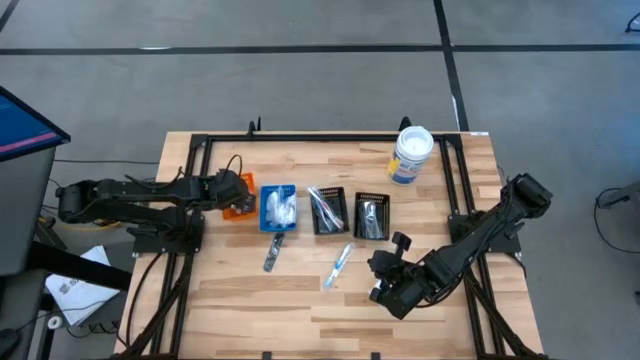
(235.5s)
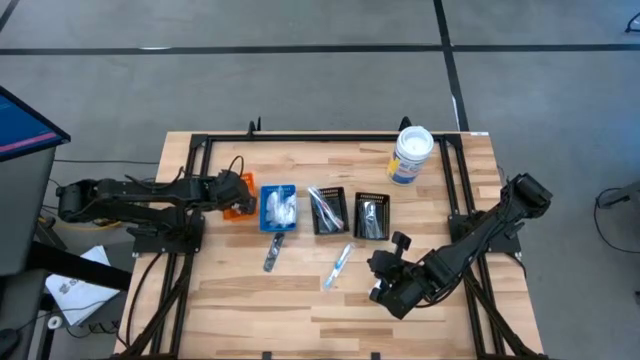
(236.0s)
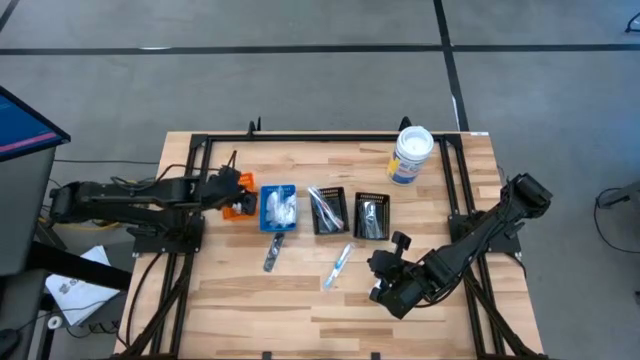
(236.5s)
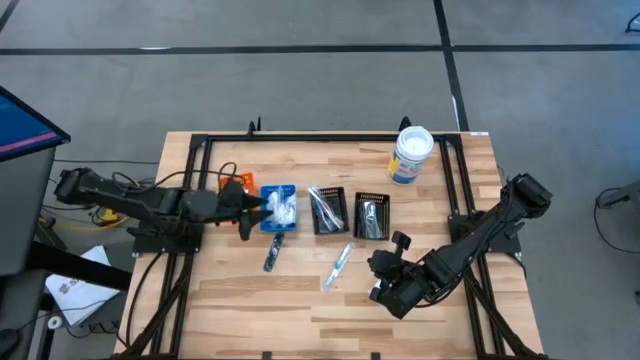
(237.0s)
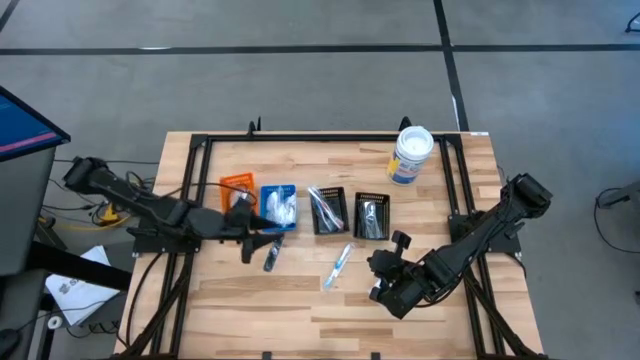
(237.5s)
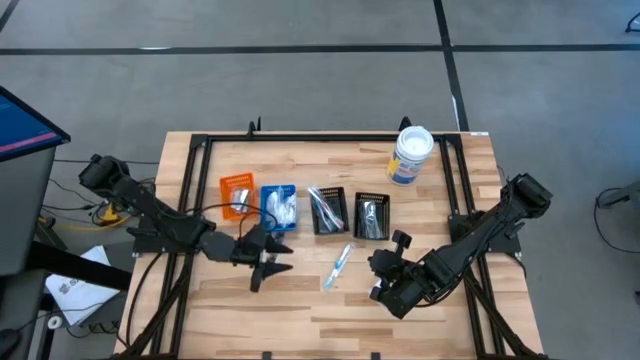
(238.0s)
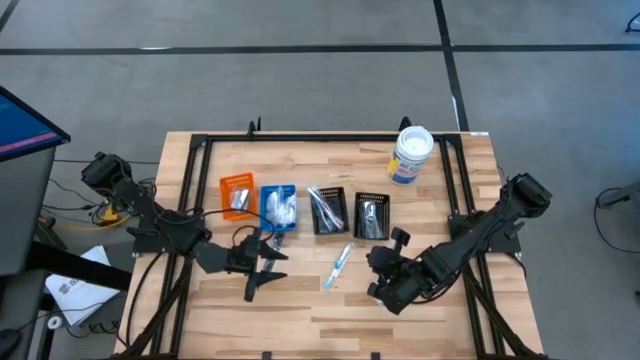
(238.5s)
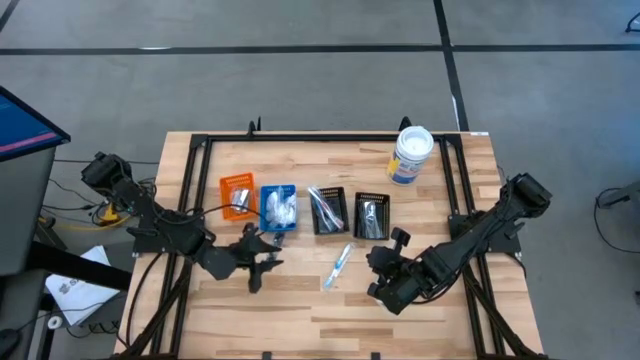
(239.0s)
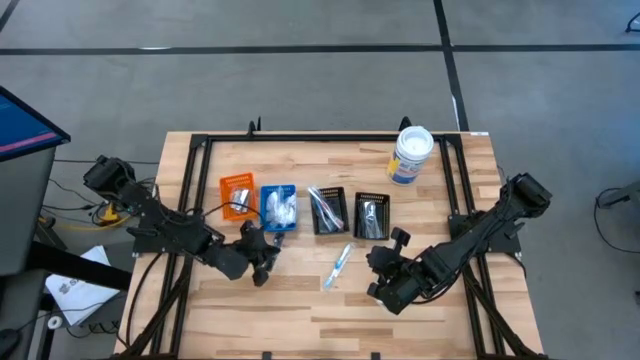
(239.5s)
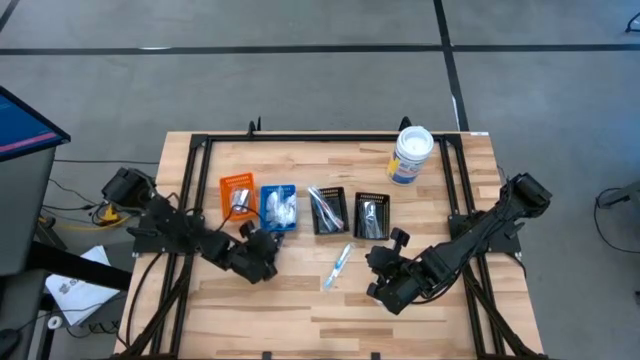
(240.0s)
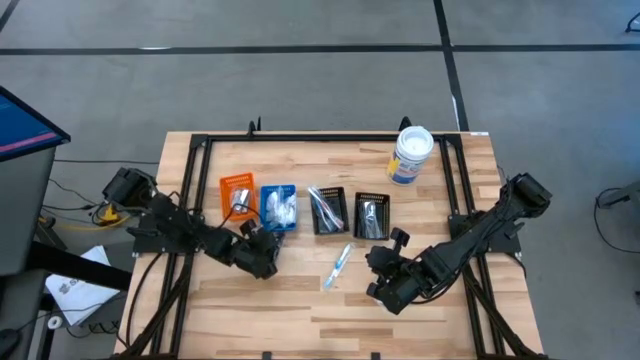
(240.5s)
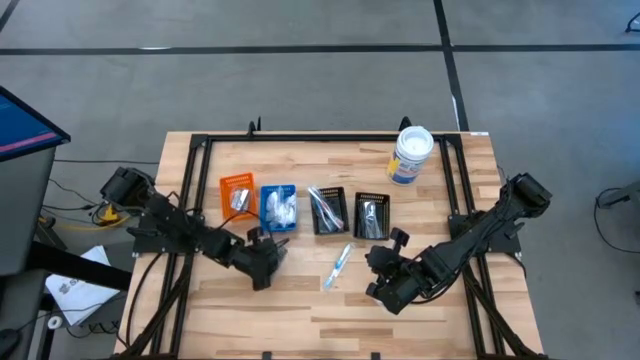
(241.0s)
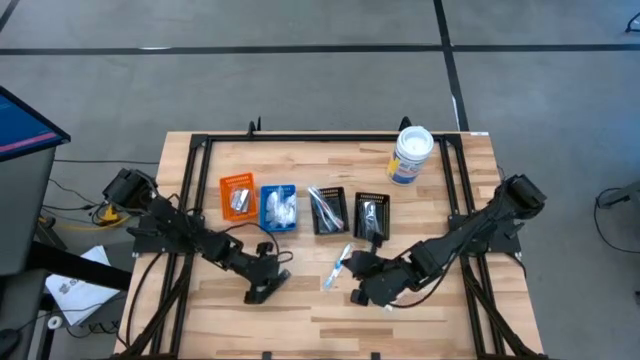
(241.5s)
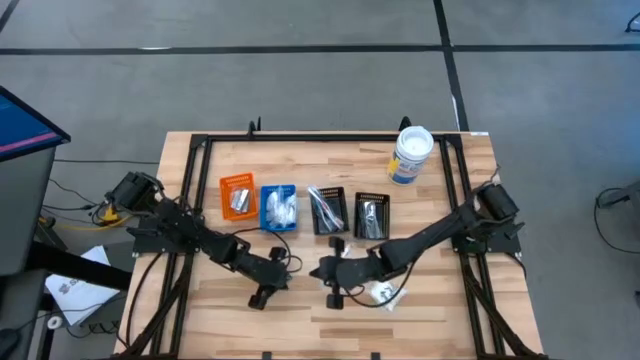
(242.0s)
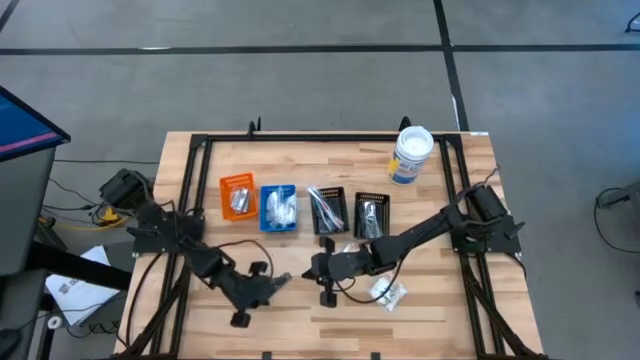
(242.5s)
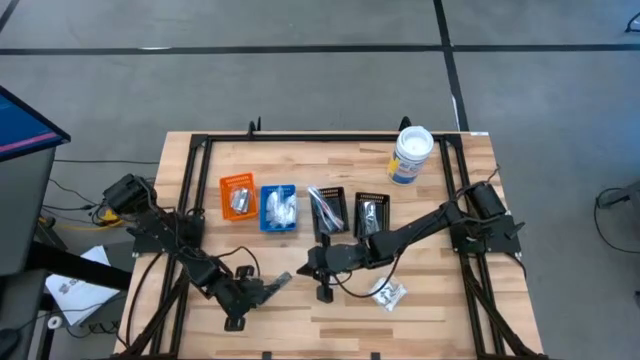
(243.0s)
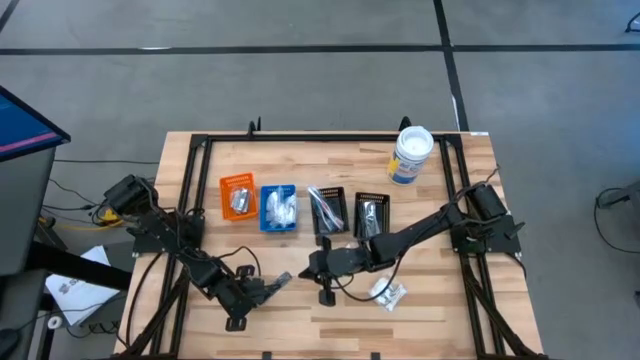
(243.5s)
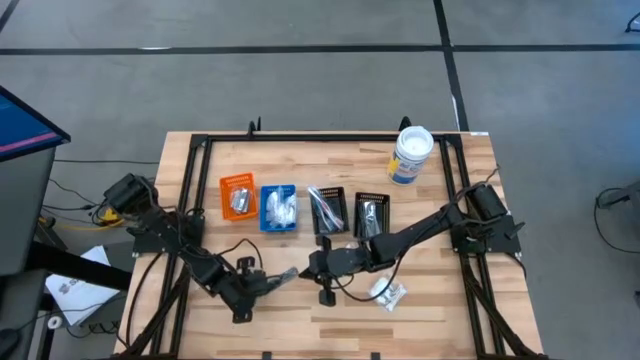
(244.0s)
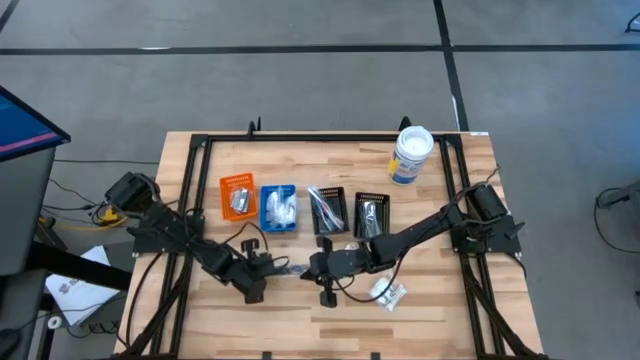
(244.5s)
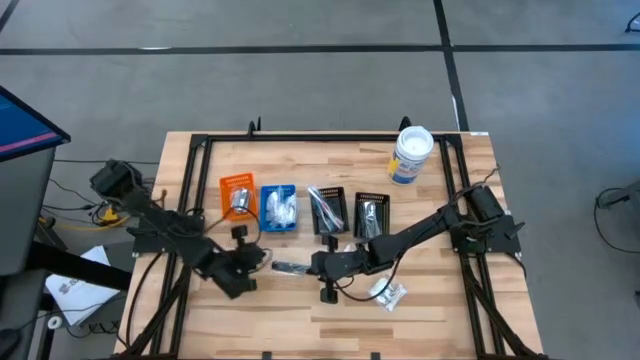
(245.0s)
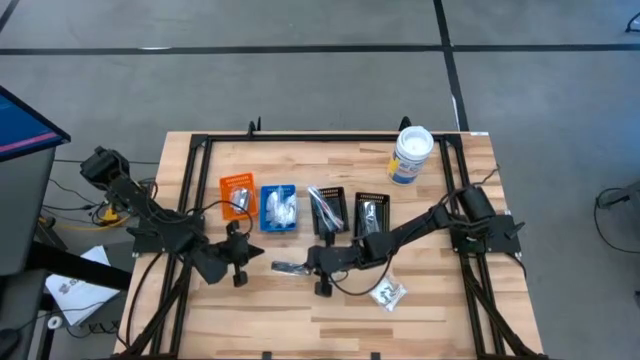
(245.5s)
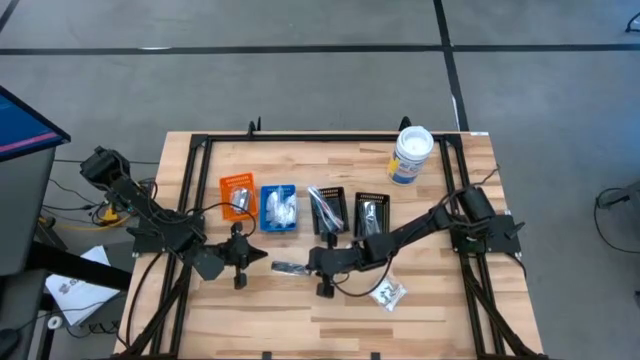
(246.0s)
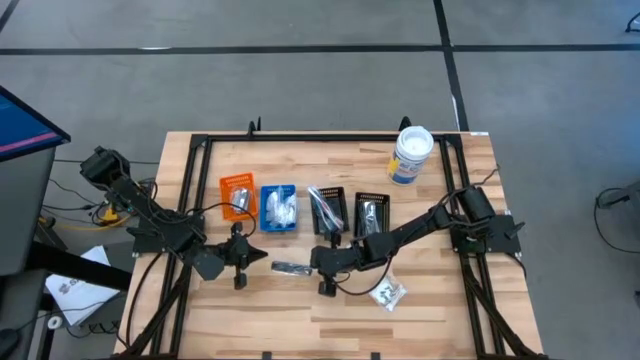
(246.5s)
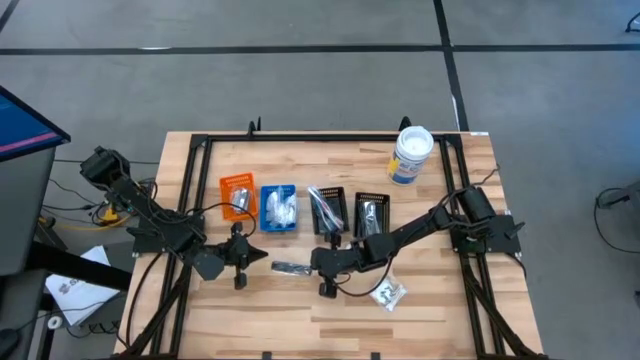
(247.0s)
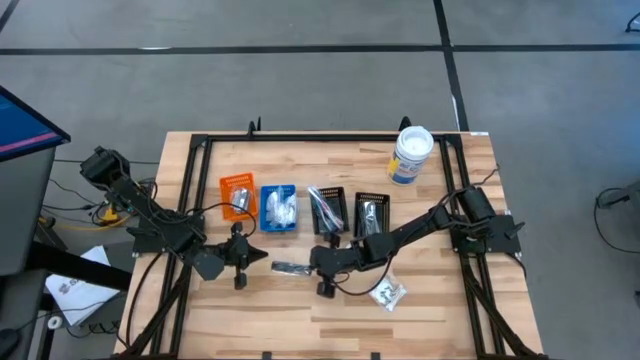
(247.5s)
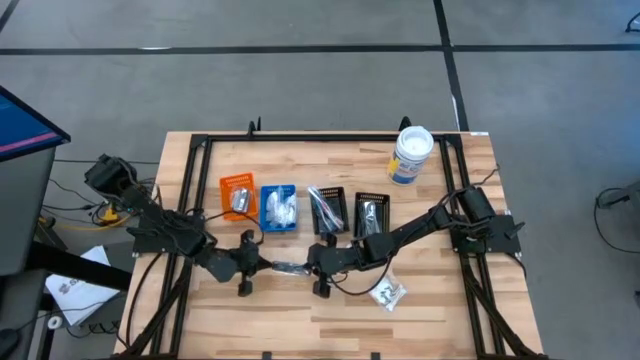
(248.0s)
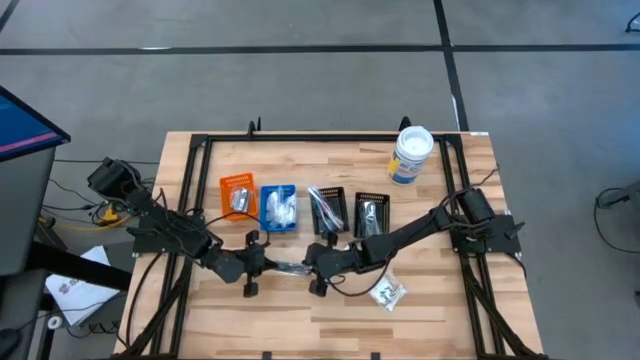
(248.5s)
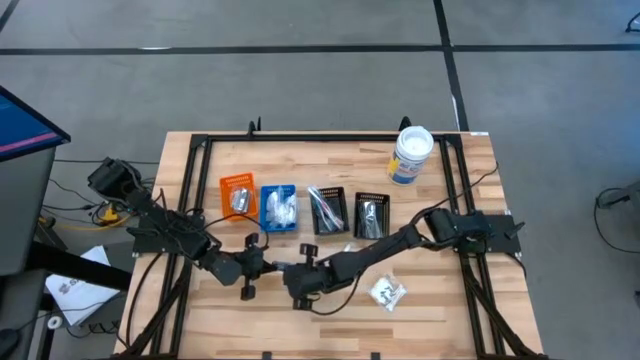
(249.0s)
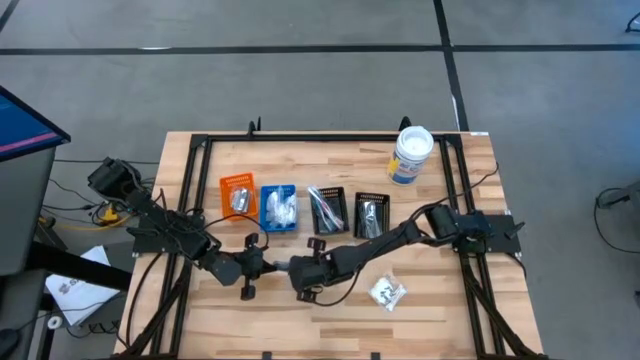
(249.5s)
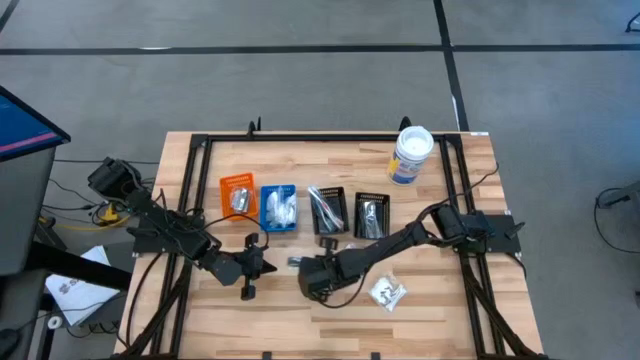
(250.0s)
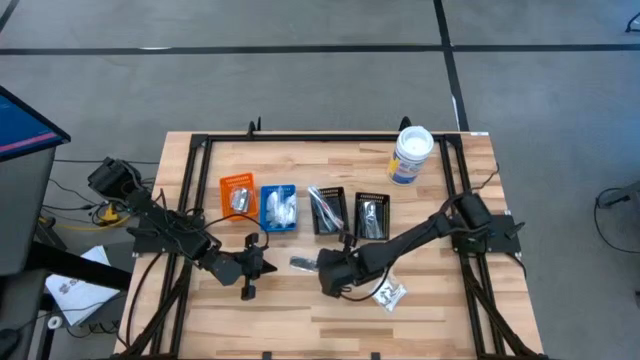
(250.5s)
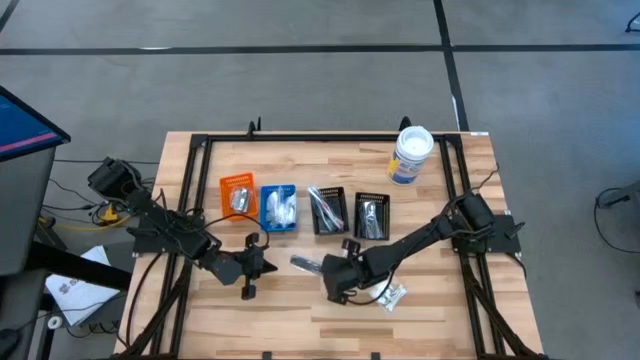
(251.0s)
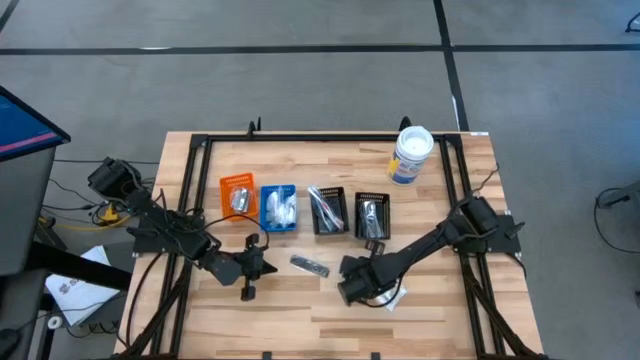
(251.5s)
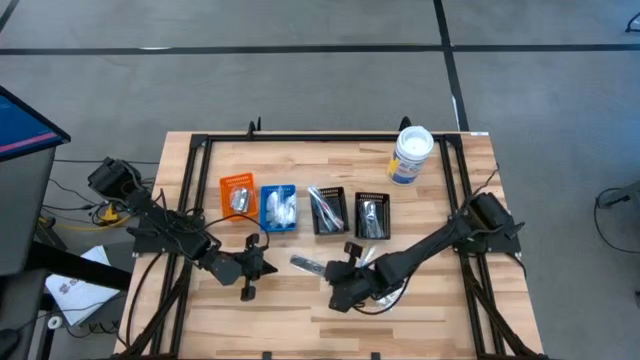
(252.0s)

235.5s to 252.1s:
Task: Pick & Place Travel size toiletries
Put the black comb into the right black bin

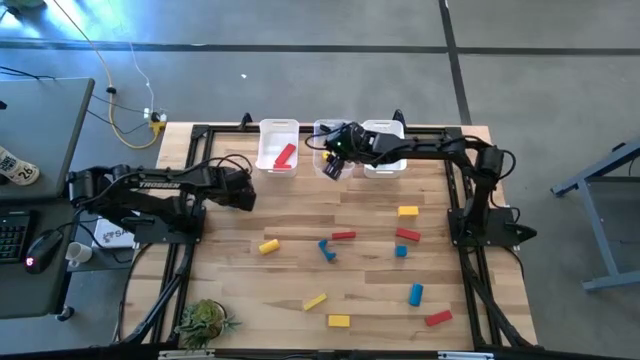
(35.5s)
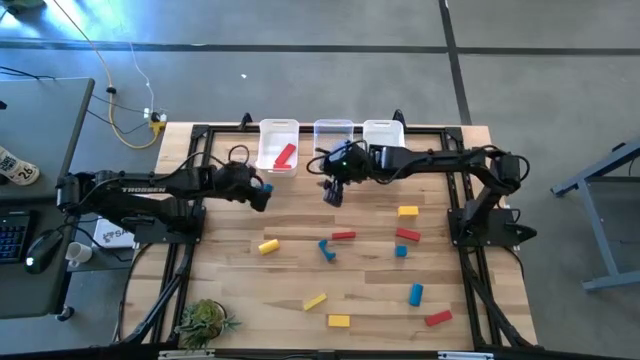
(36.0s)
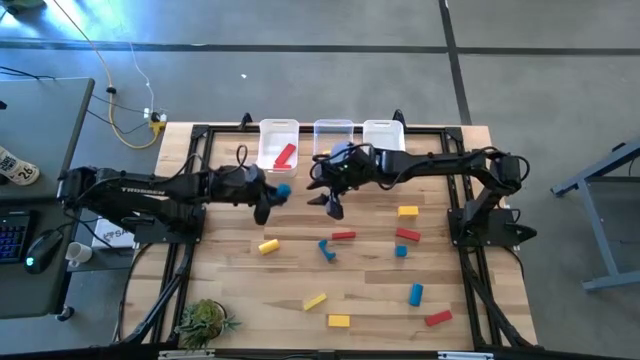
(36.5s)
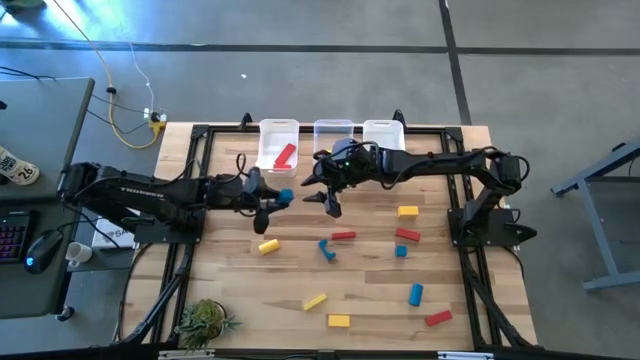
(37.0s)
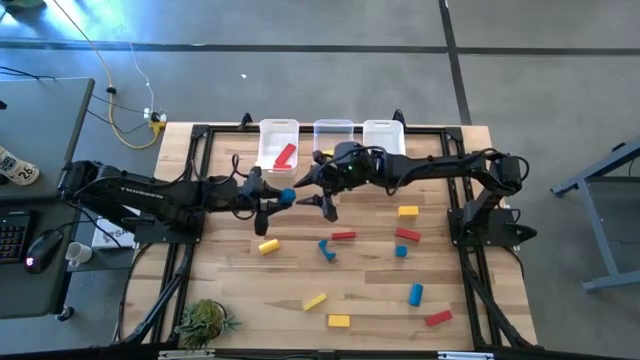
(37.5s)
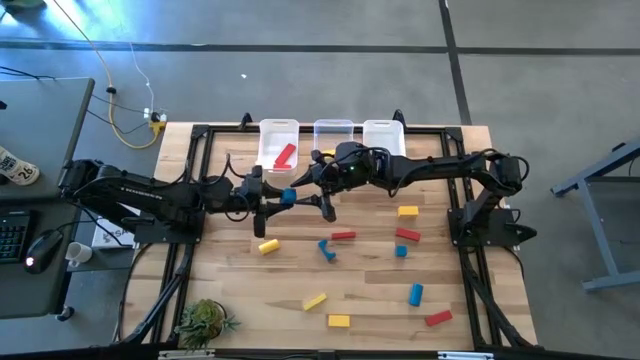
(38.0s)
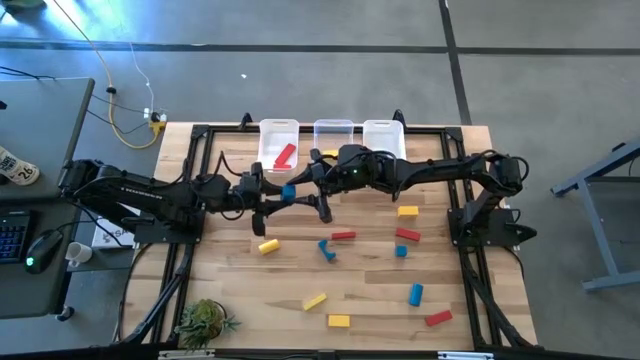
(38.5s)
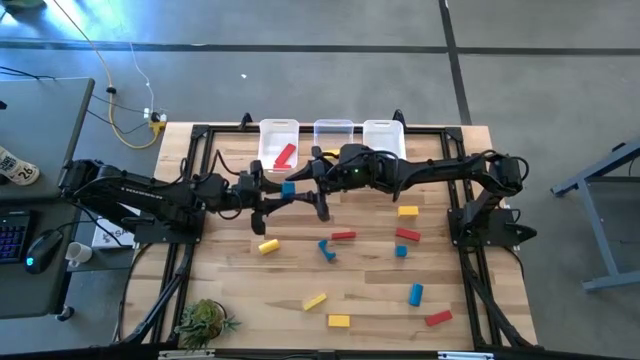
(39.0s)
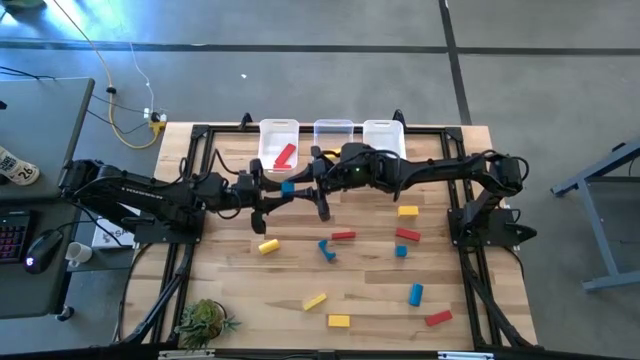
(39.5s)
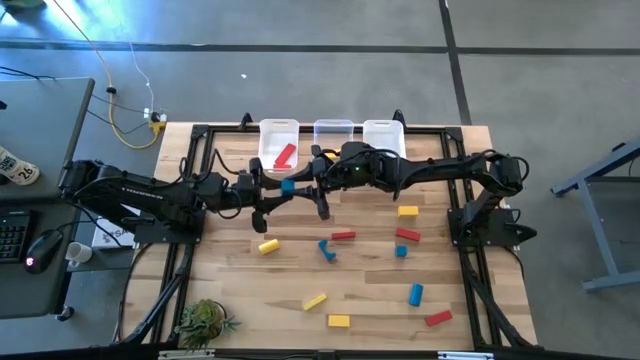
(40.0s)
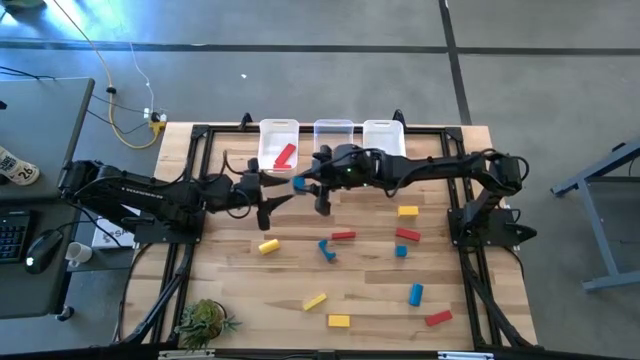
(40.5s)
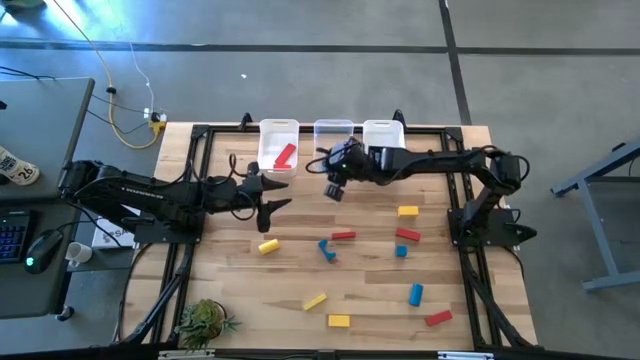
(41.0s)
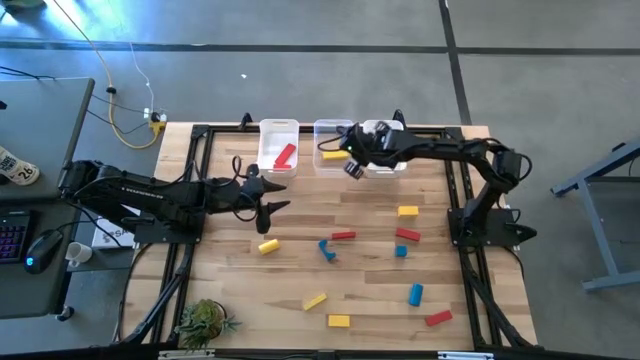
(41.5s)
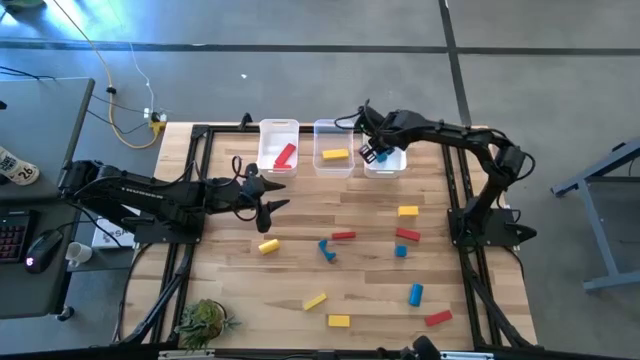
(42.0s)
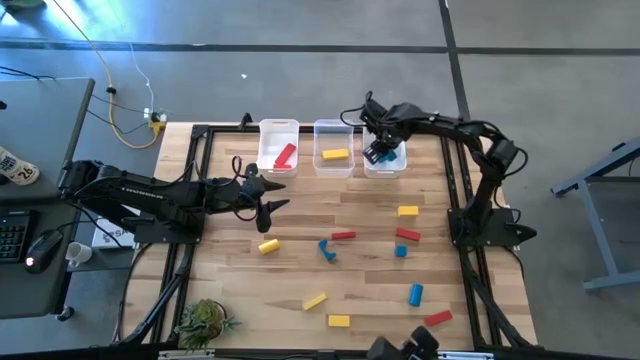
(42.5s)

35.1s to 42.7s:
Task: Sort & place blocks by color
Put the blue block into the right white bin
